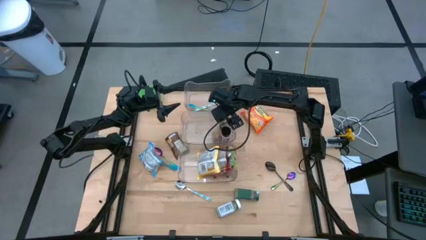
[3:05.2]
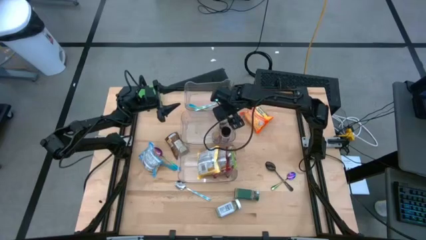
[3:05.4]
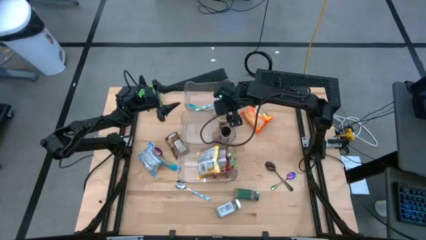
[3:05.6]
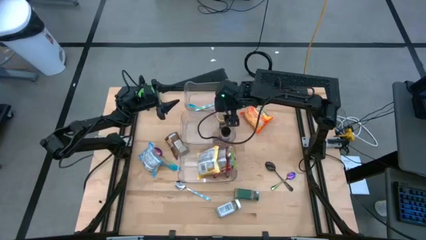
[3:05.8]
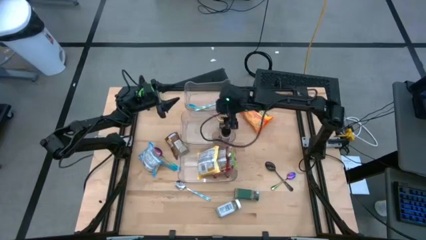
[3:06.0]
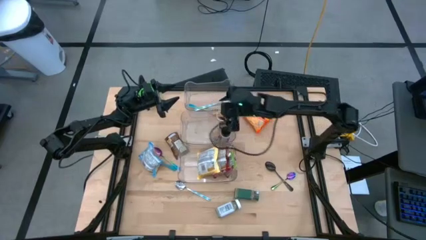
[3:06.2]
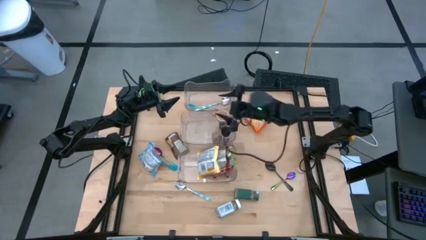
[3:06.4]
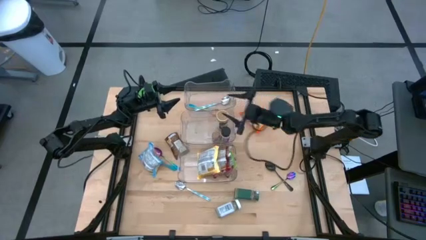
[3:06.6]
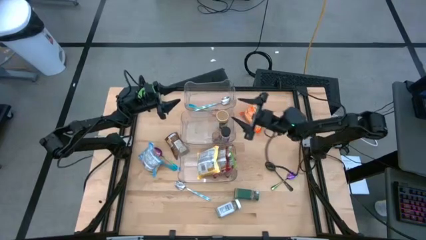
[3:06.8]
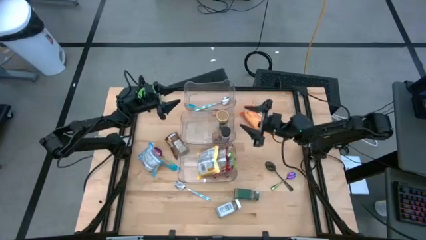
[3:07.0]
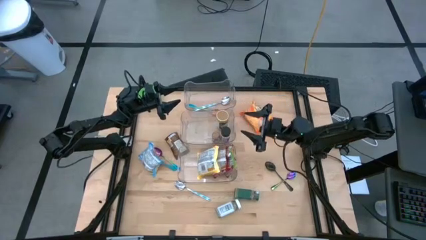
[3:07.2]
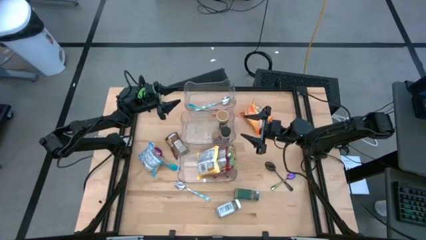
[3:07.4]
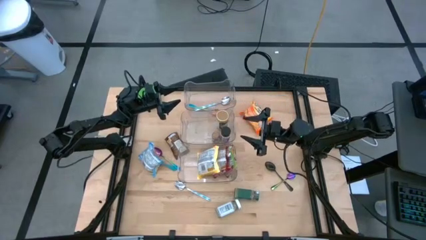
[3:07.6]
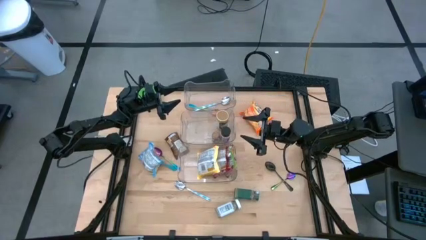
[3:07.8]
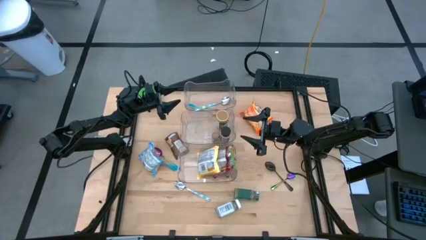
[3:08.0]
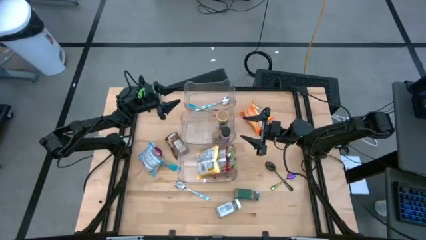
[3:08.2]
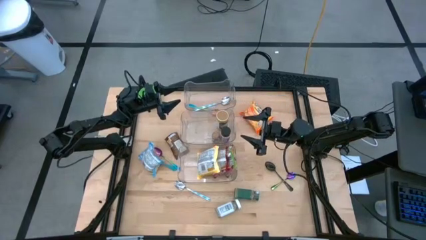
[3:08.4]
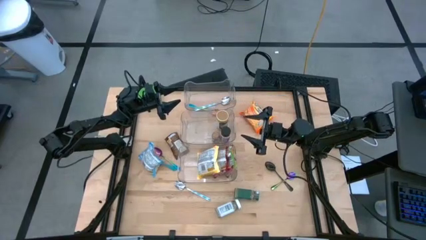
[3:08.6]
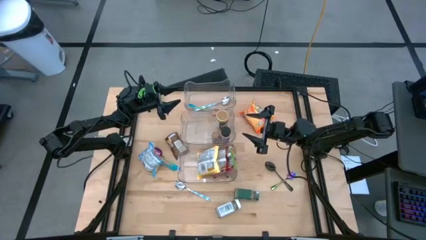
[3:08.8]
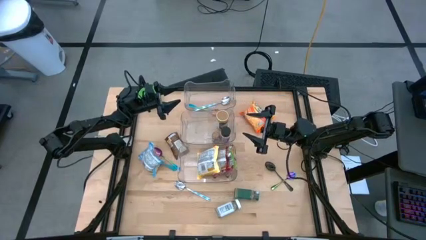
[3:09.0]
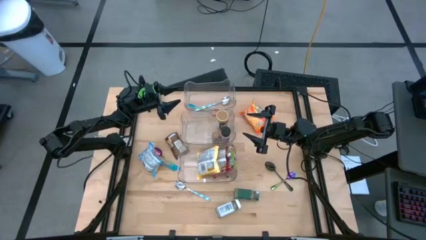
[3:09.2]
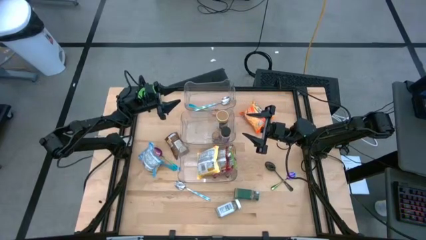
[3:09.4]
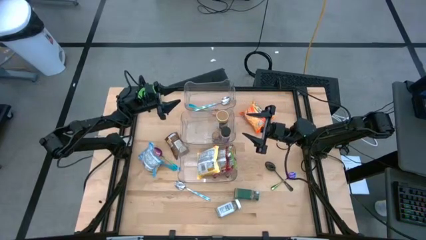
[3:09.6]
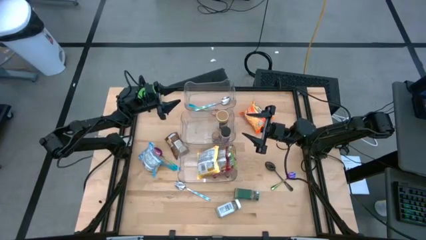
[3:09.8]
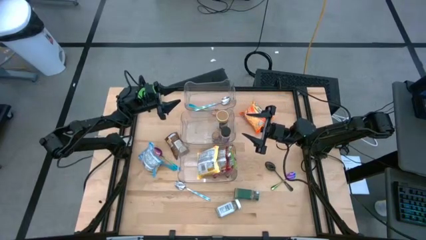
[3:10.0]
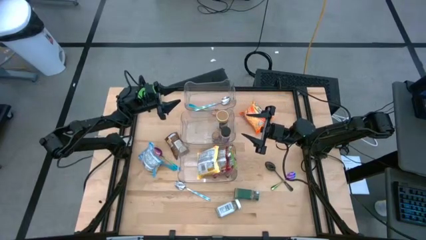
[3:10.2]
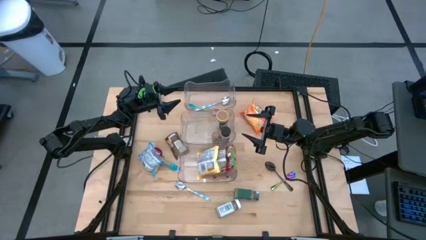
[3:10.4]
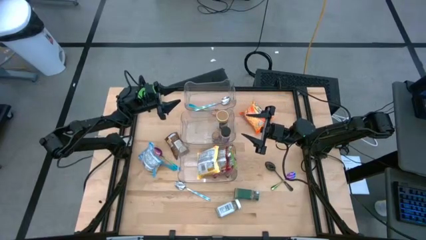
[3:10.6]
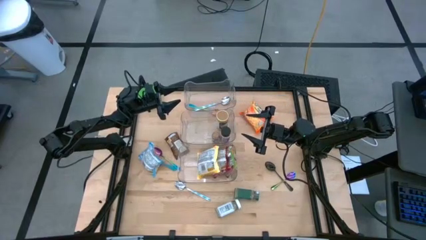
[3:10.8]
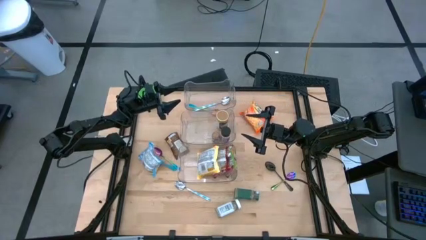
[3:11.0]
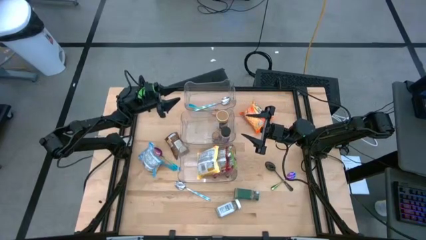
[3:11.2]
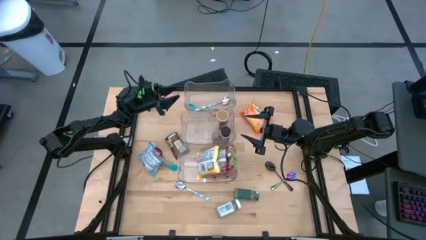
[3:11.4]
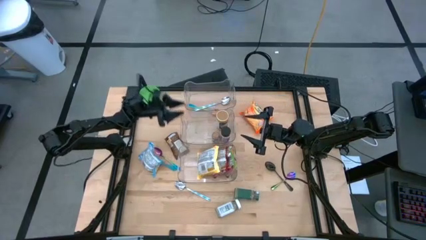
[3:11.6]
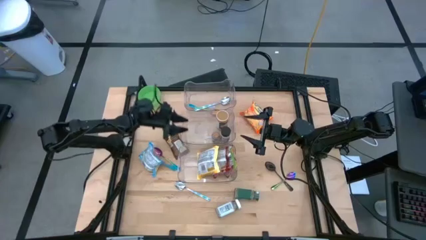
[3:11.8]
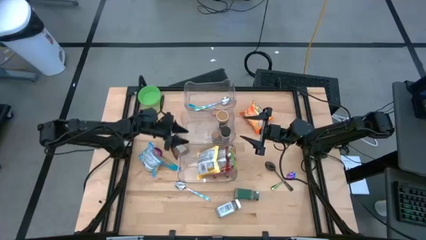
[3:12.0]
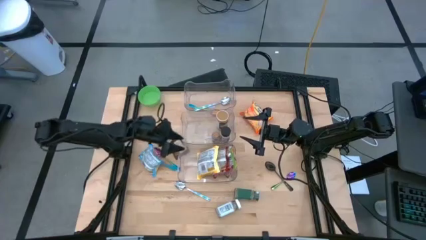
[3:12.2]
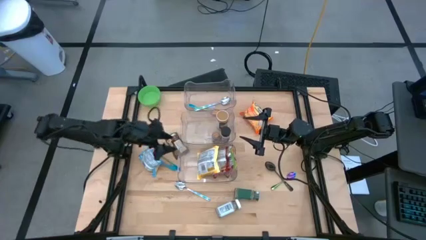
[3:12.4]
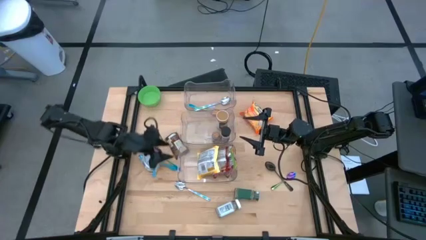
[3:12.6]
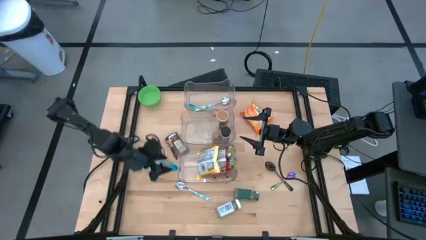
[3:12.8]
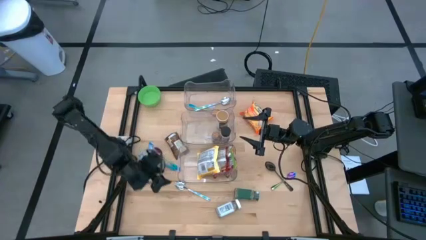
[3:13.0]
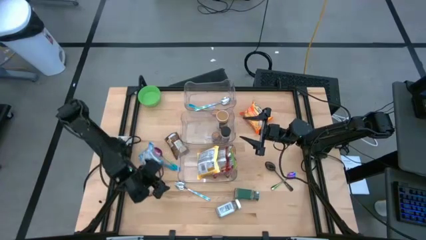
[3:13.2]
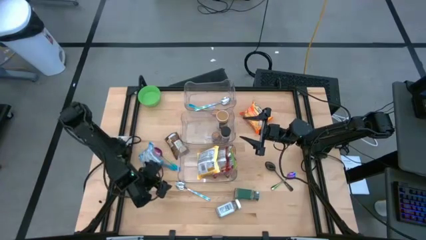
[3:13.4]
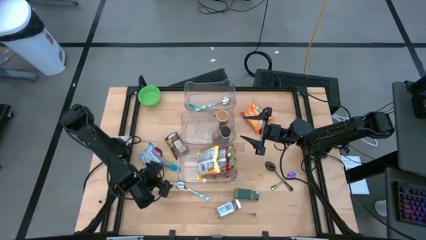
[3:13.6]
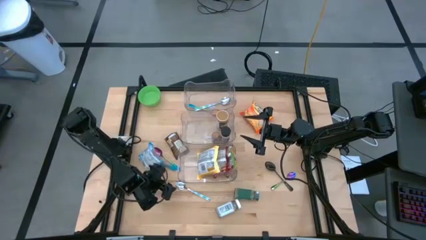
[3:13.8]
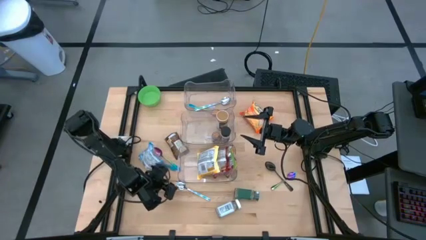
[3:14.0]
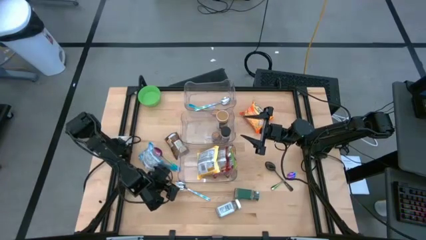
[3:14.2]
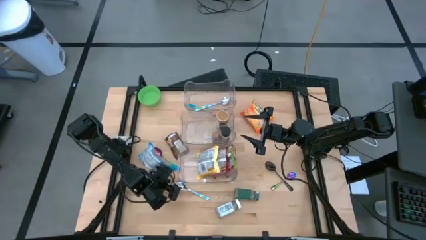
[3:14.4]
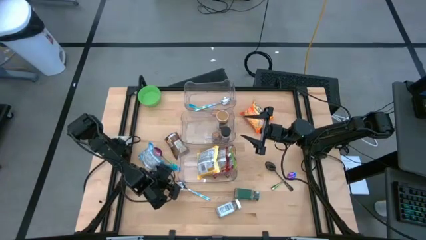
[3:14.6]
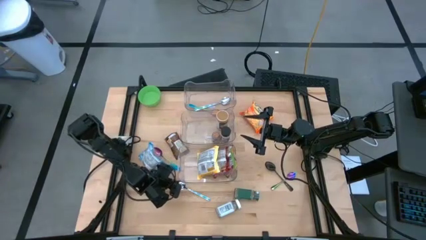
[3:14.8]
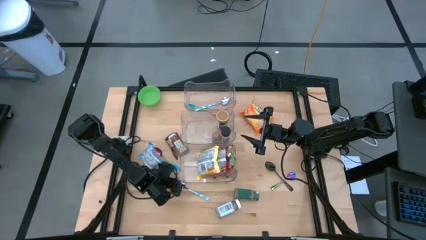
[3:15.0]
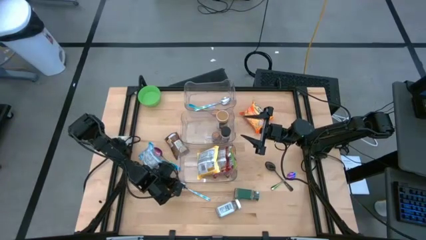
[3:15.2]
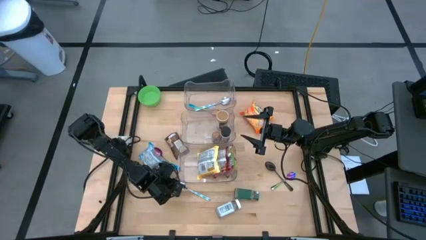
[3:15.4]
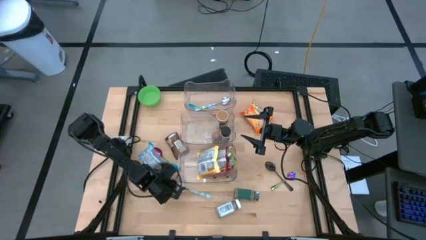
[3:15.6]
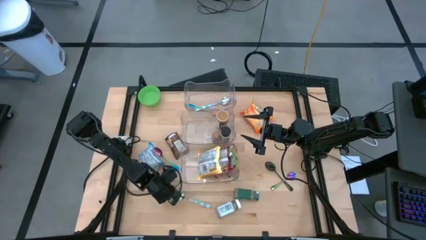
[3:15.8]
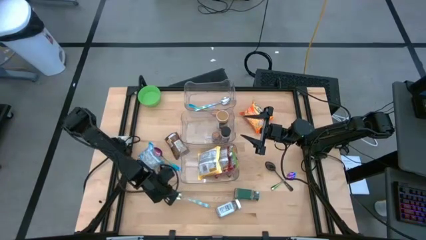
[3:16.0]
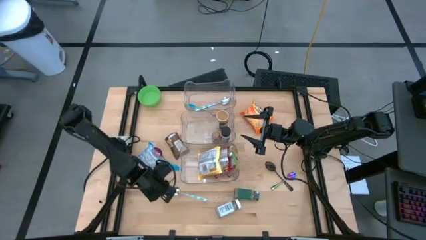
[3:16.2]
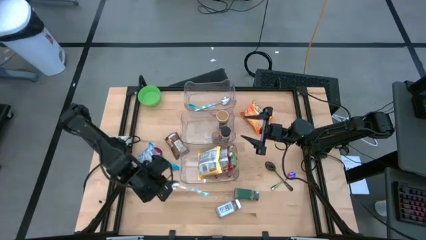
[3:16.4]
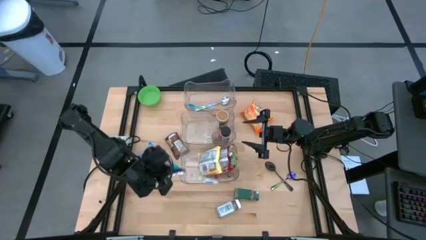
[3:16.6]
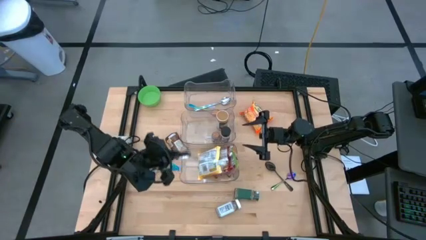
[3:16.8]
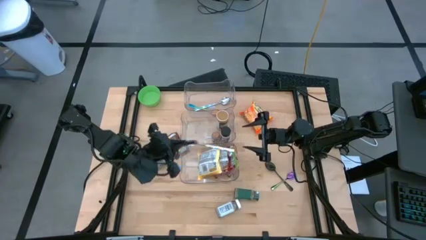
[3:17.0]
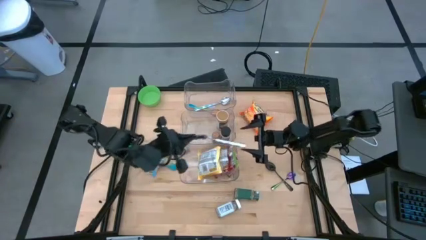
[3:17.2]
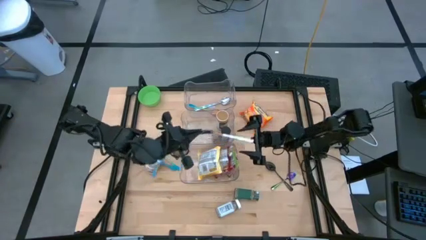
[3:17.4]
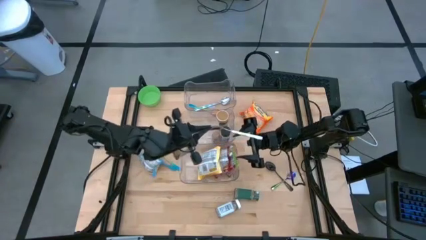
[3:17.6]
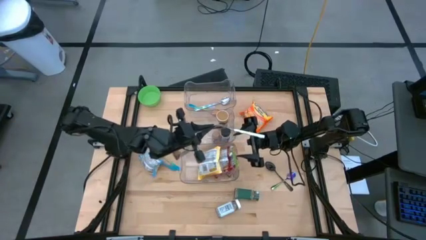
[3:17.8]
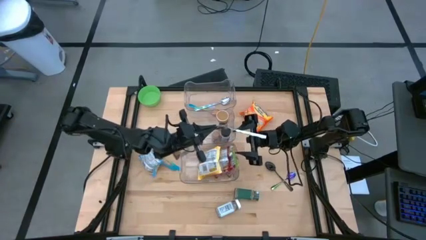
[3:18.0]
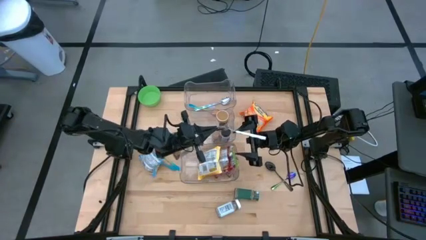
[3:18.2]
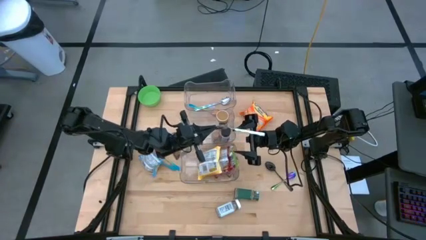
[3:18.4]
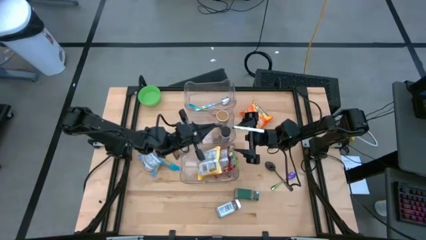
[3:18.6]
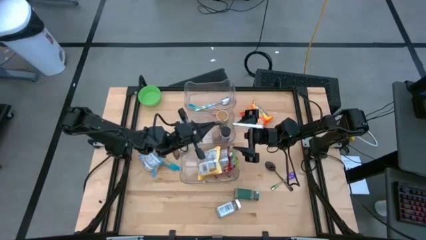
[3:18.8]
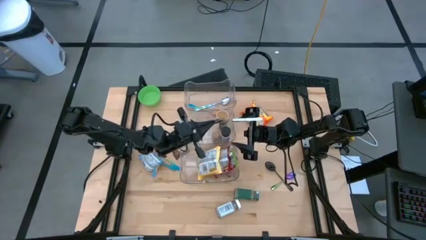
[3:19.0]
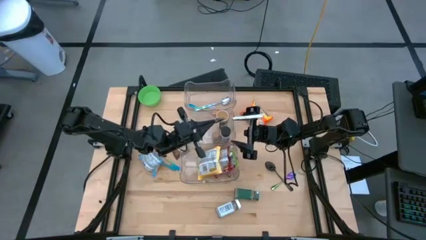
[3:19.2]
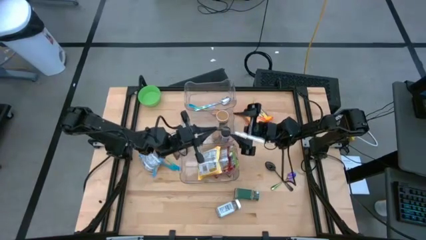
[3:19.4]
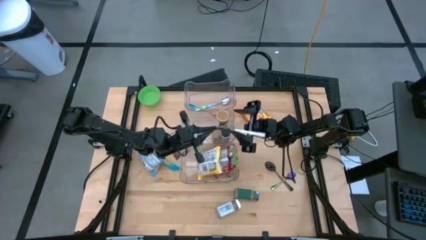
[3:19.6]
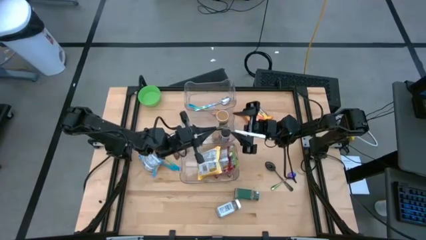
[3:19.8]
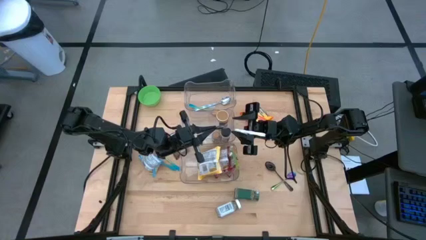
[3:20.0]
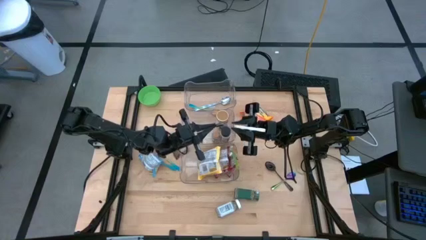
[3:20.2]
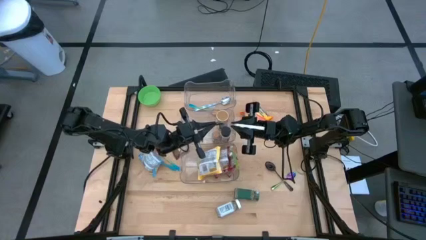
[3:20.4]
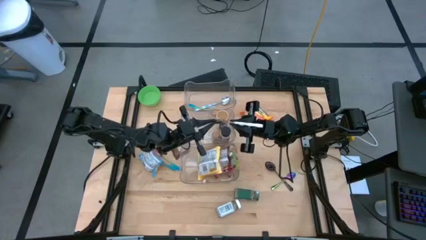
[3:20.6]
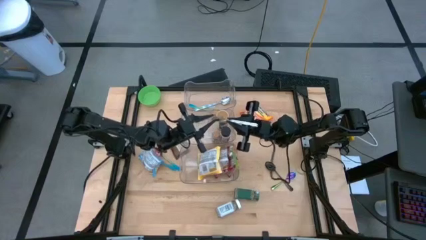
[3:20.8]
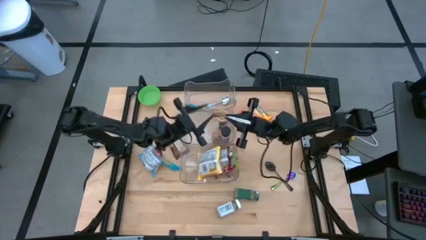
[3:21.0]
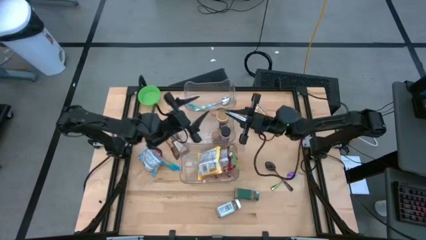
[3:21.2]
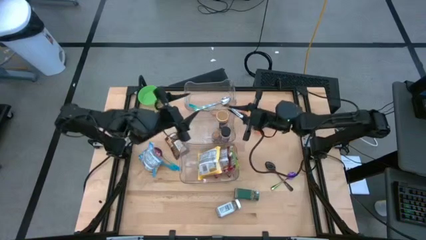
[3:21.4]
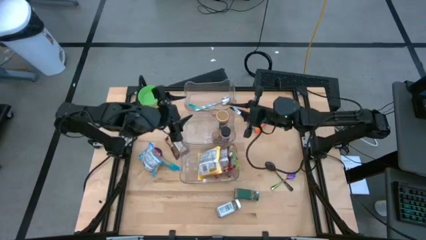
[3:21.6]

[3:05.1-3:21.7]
Task: Pick & Place Food Item
Put the white patterned spoon into the top transparent bin

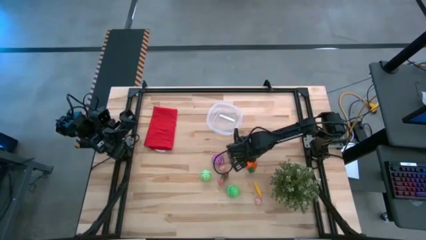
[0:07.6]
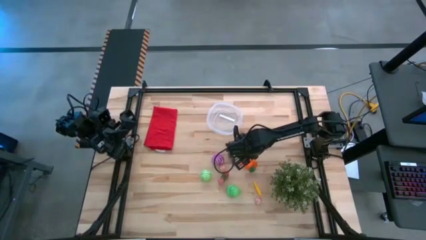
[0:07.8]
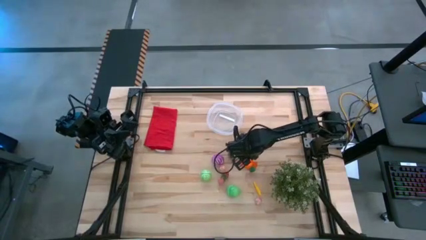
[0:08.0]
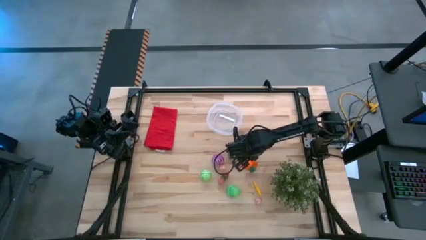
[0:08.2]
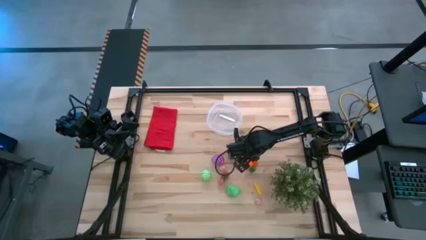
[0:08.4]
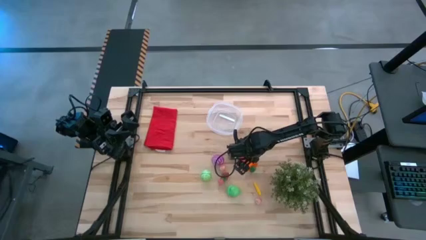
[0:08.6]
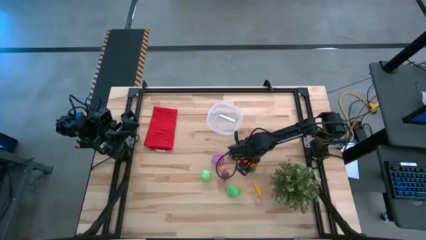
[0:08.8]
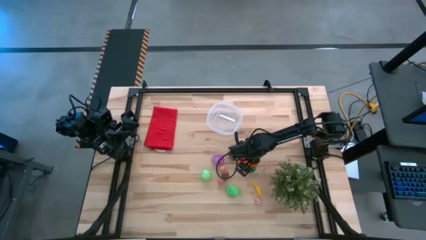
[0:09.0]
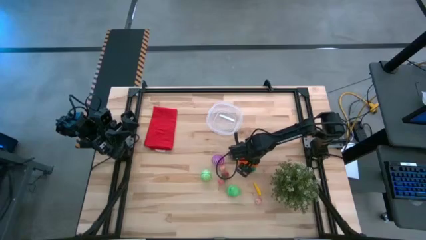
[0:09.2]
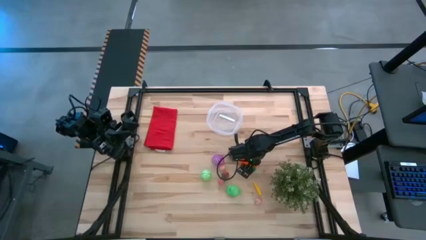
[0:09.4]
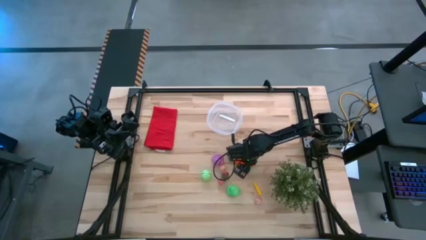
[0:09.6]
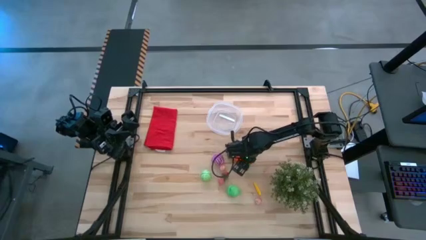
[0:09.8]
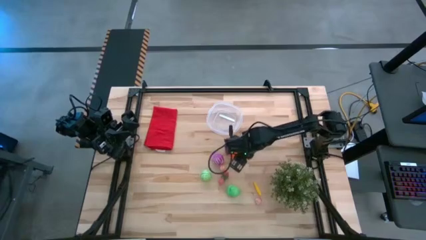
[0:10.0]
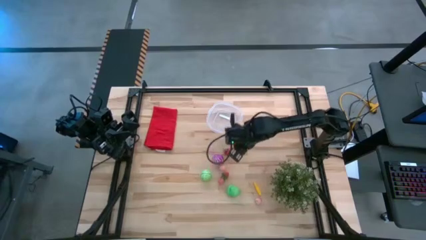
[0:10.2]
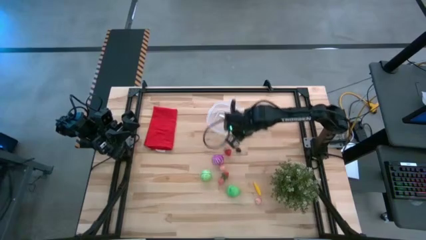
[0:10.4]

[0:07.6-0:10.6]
Task: Pick and placing Produce into tupperware
Put the orange carrot into the transparent bin
